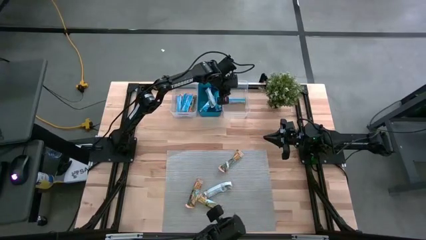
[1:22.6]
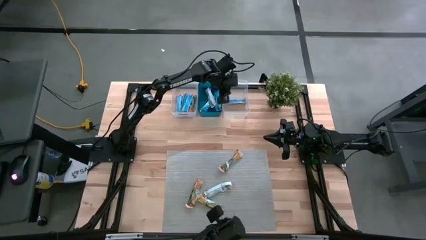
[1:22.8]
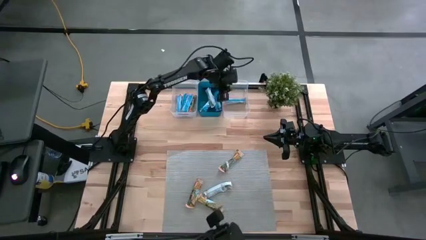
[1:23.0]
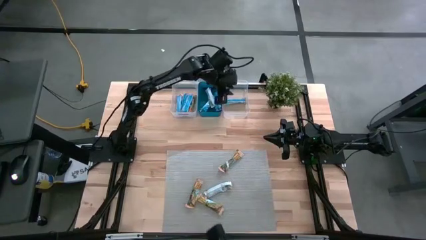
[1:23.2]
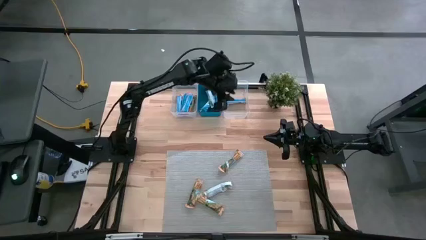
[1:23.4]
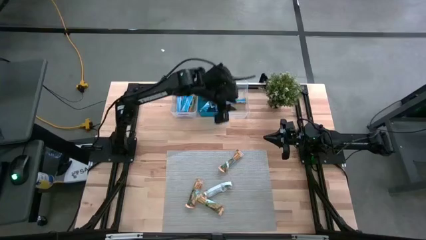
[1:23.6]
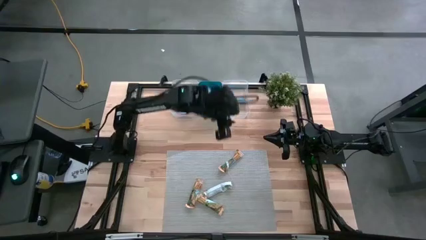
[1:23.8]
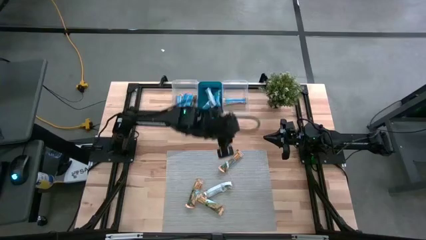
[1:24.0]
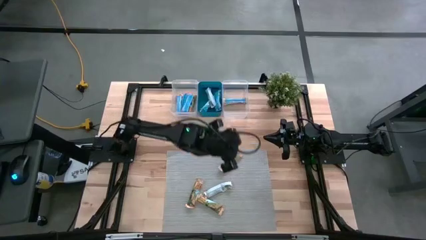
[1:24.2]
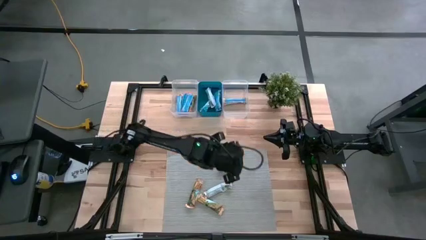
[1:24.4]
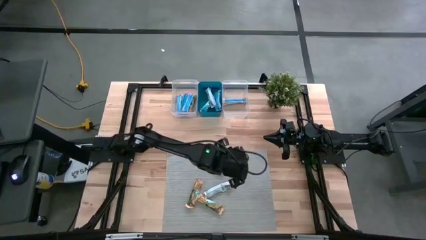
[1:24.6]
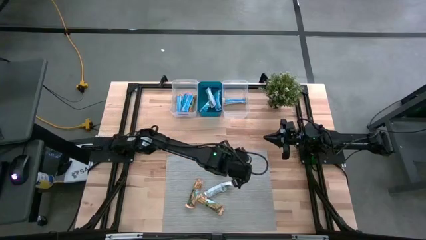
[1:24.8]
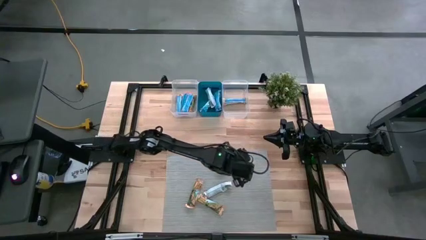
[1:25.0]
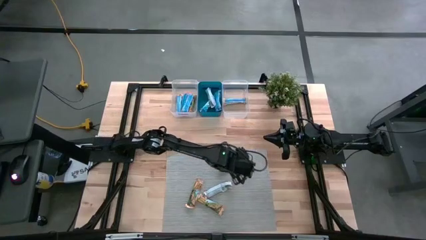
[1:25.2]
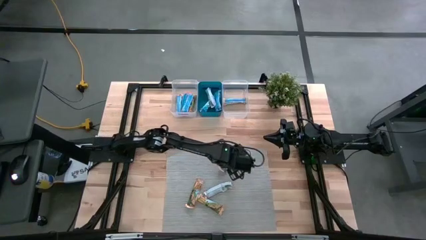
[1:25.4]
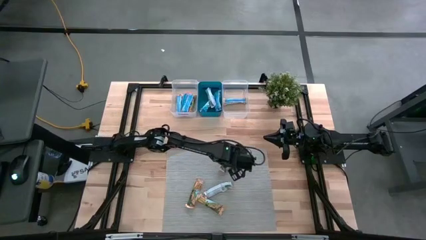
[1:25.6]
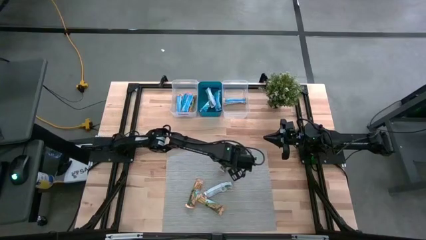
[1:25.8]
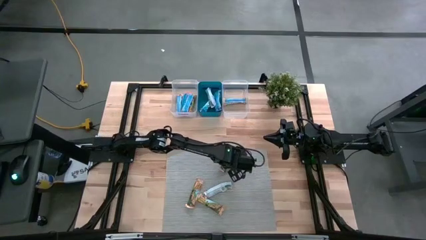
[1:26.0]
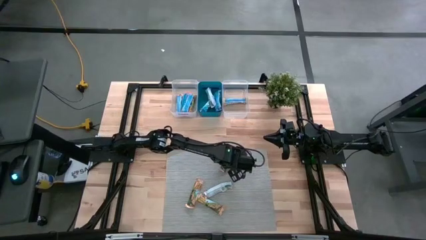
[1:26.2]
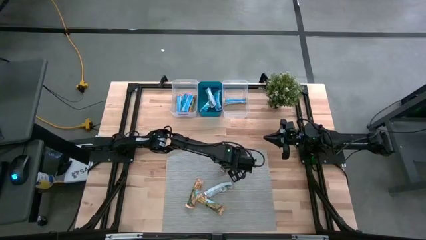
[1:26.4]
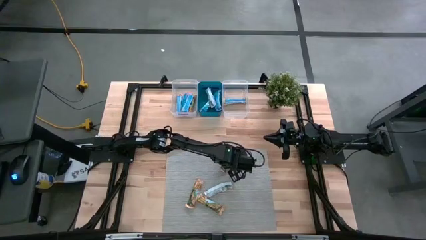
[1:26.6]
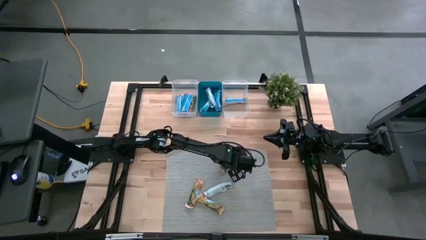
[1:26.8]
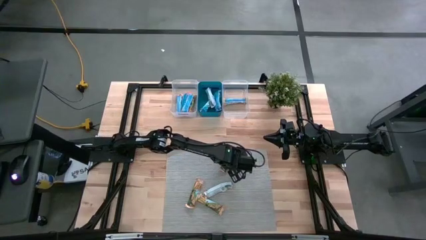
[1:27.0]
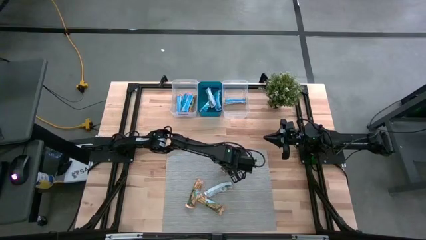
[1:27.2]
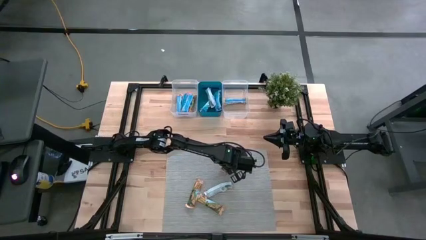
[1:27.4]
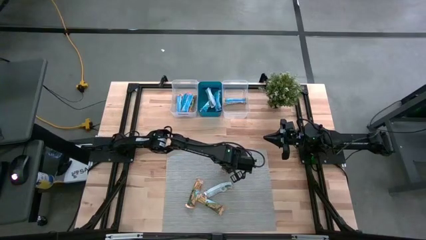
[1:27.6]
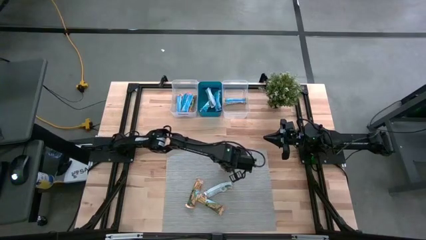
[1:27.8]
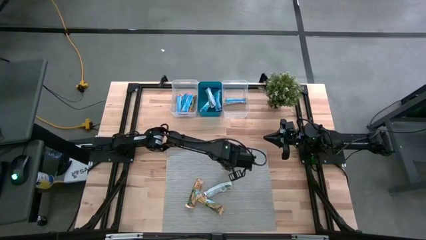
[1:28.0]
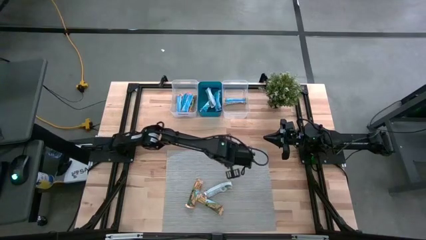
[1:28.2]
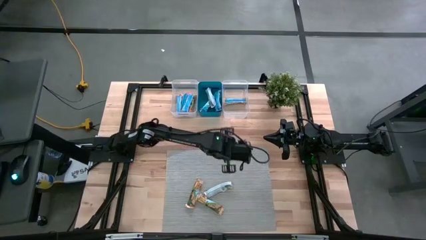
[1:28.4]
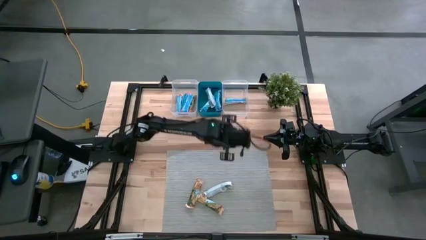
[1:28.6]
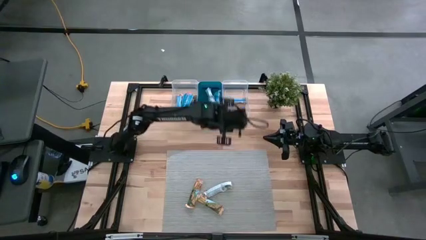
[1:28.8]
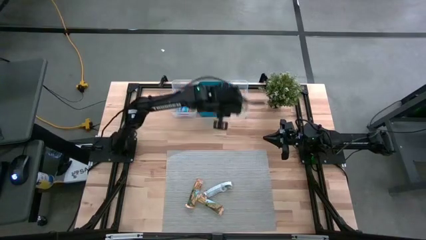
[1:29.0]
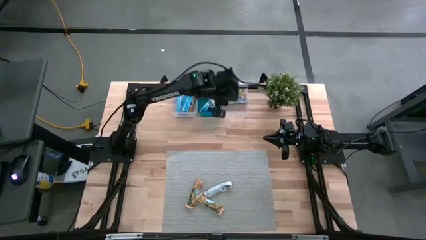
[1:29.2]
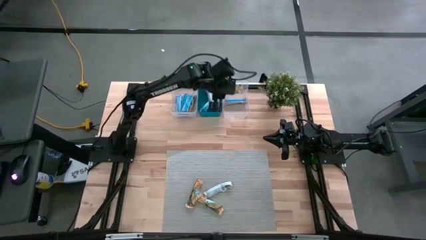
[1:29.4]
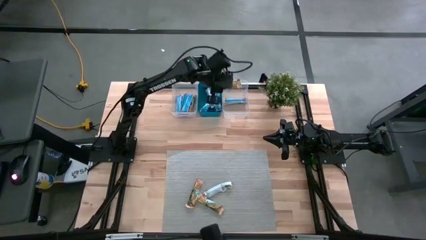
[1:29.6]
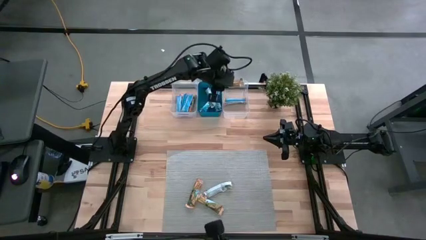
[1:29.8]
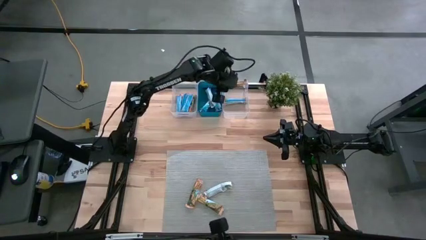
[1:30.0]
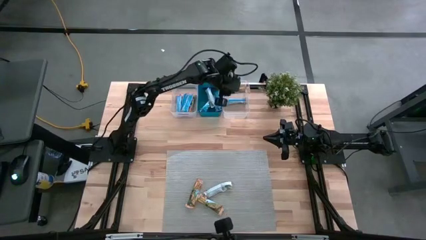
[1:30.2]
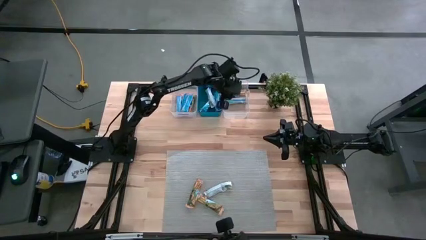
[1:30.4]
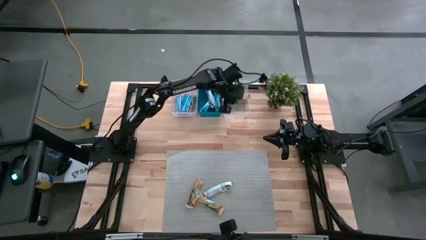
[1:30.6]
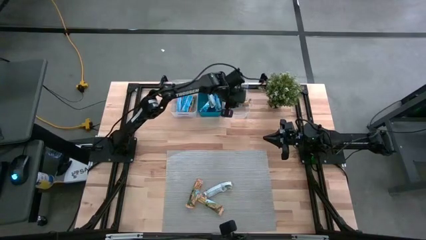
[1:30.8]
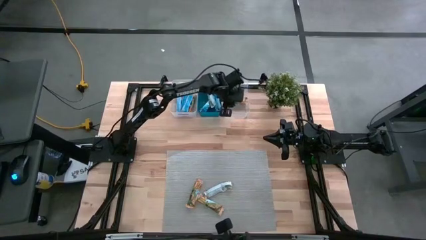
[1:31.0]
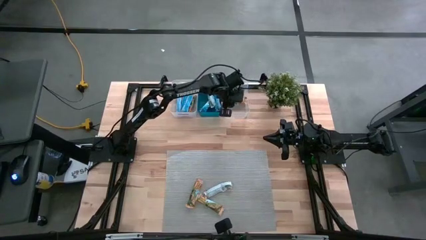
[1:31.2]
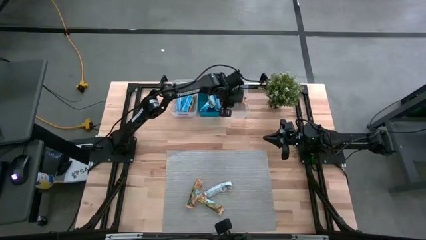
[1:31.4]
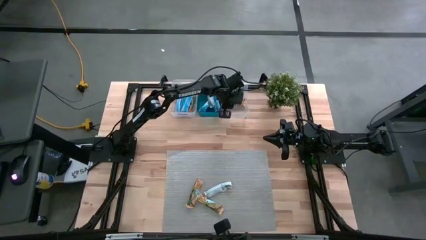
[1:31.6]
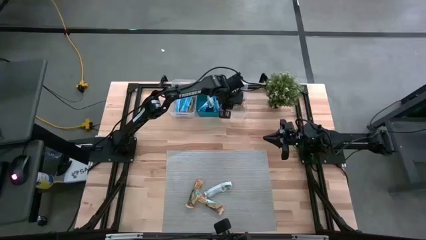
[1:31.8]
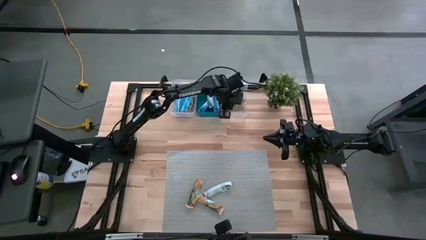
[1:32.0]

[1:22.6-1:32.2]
Task: Pick and place Granola Bars by type
Put the yellow granola bar into the right transparent bin
